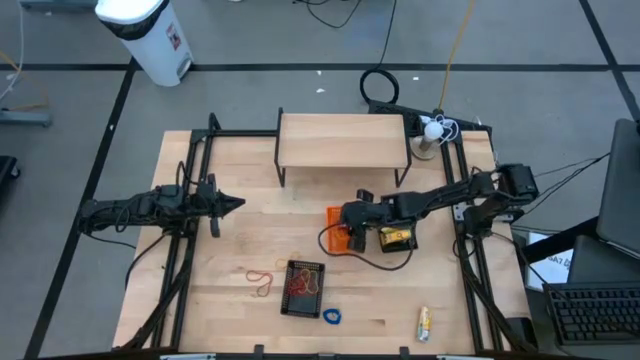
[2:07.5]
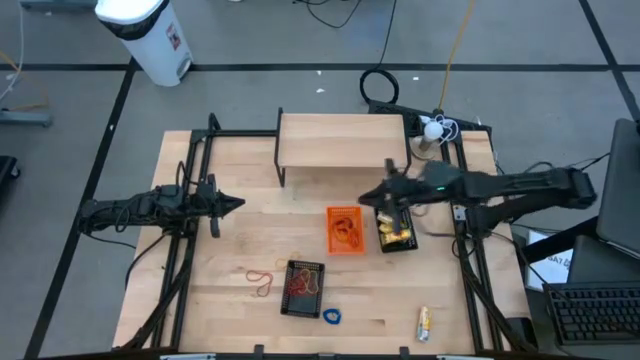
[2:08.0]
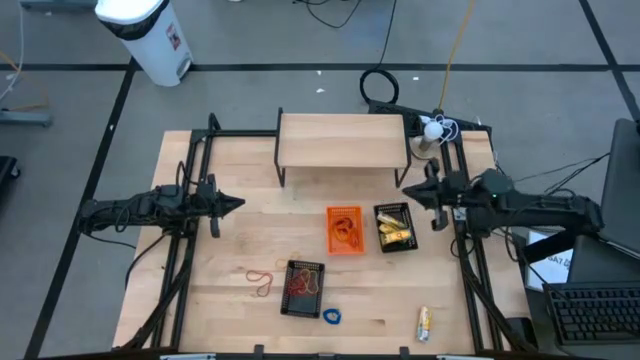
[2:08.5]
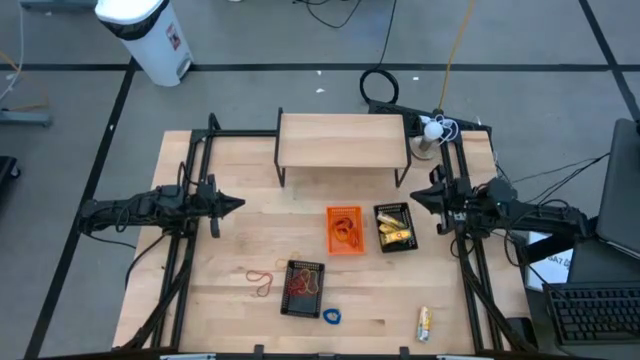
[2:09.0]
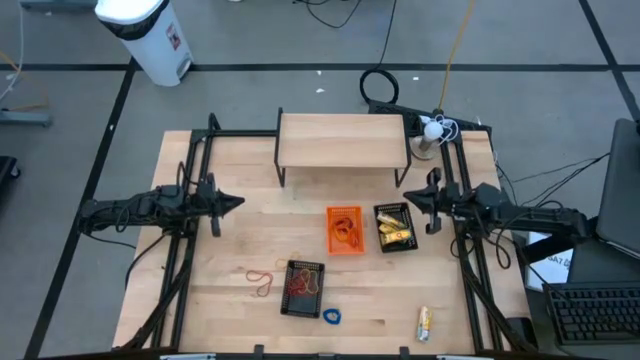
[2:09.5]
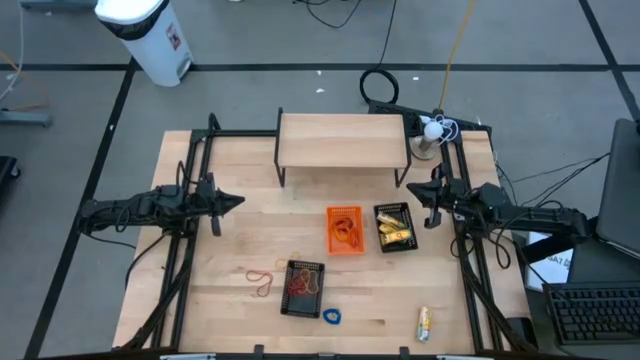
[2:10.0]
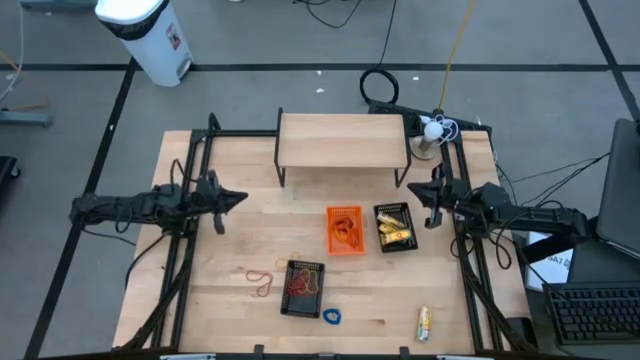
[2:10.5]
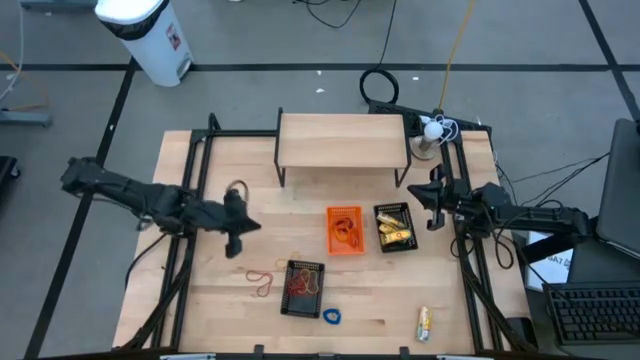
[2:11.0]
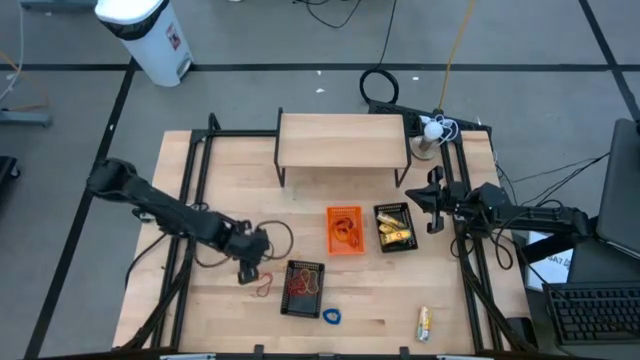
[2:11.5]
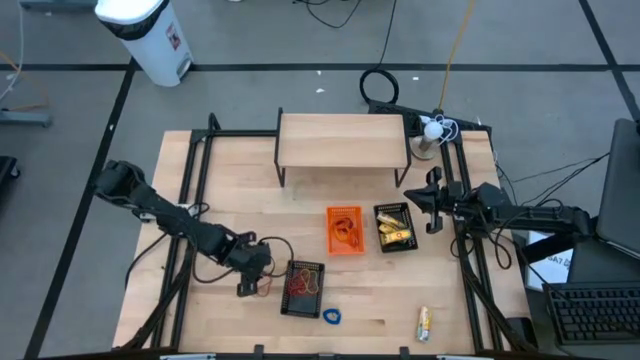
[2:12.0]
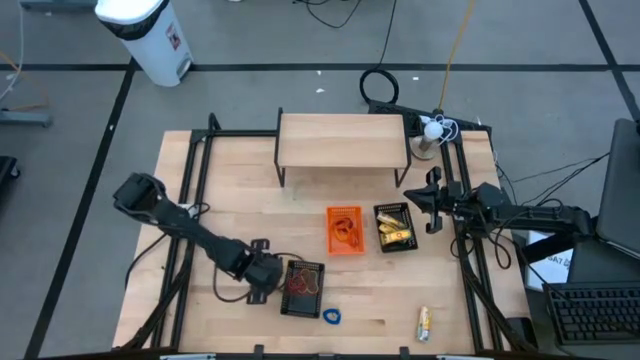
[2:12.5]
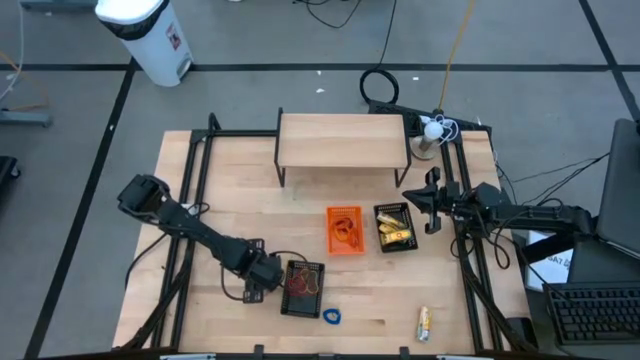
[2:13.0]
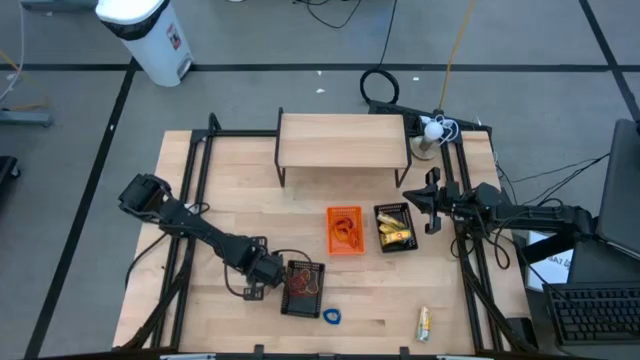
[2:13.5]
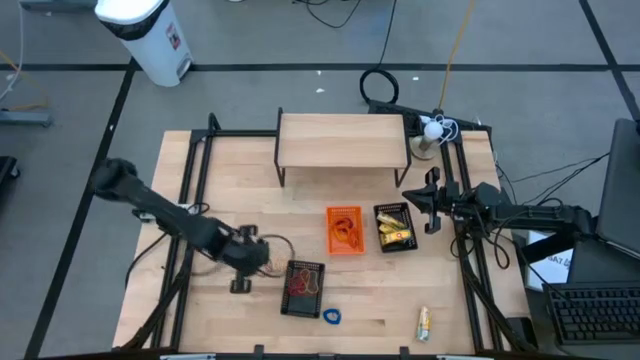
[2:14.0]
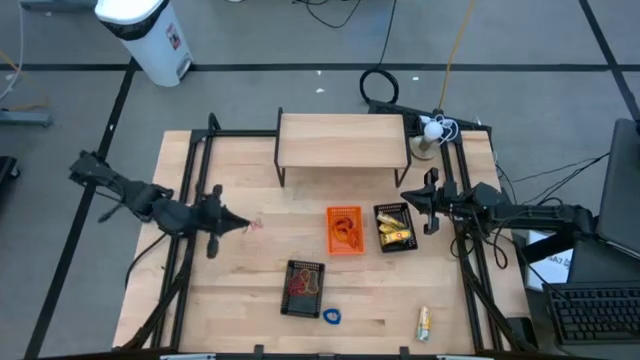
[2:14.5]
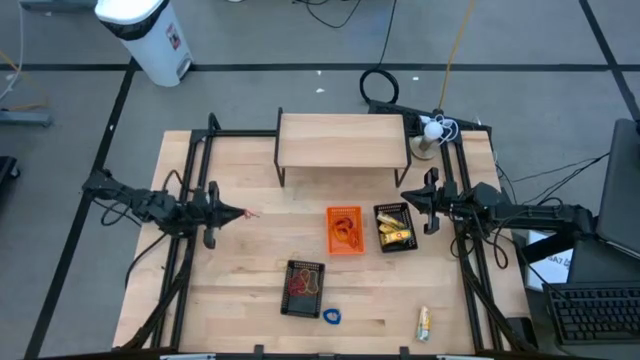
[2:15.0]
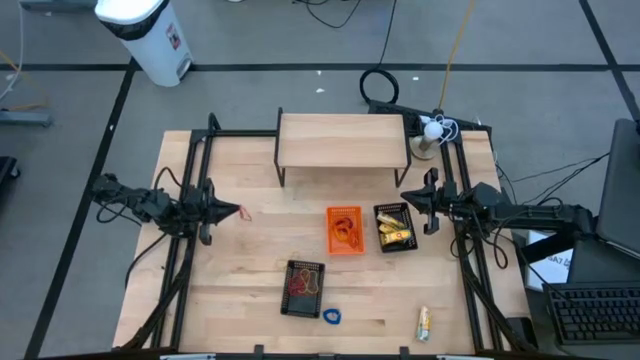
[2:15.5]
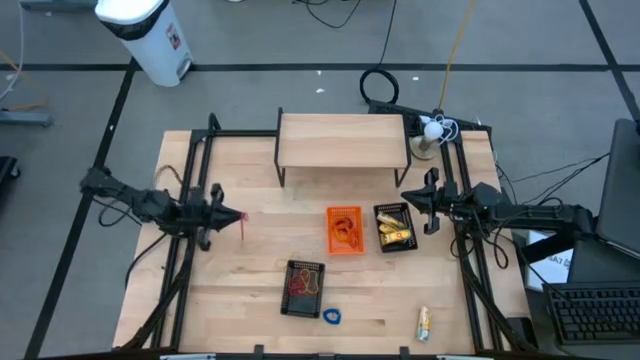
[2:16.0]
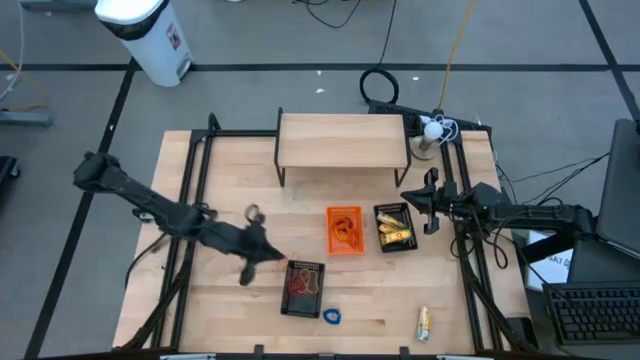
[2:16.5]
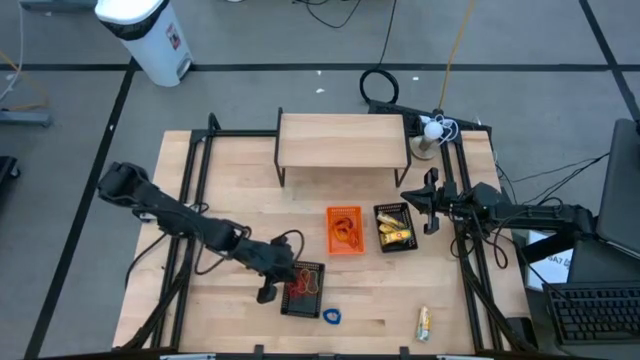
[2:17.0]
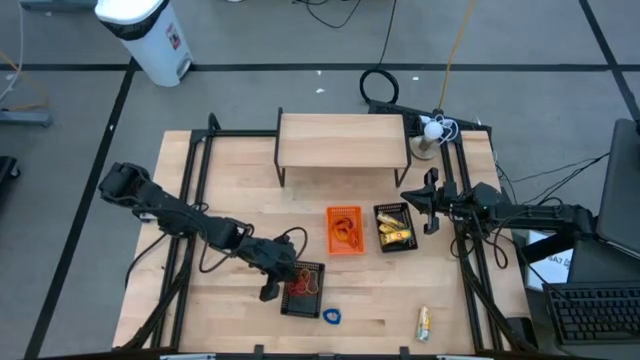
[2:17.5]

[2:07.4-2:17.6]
Task: Pick & Place Office Desk Supplies
Put the red rubber band into the bottom black bin

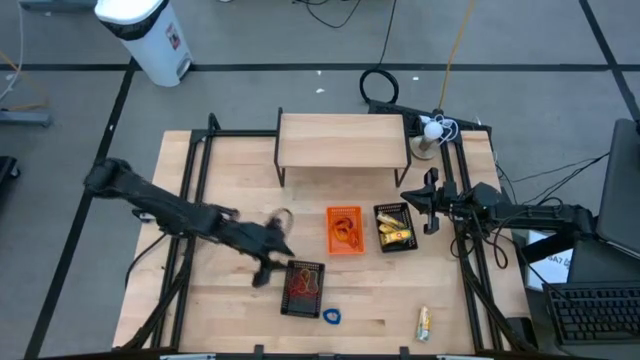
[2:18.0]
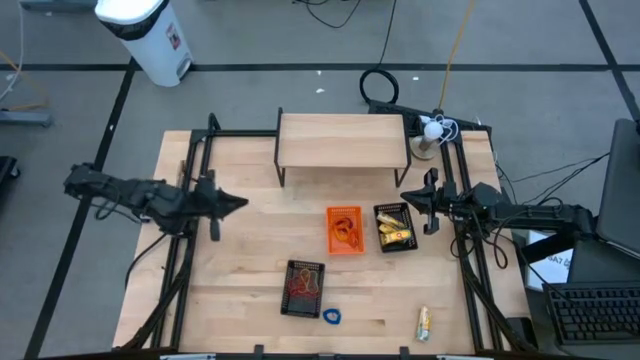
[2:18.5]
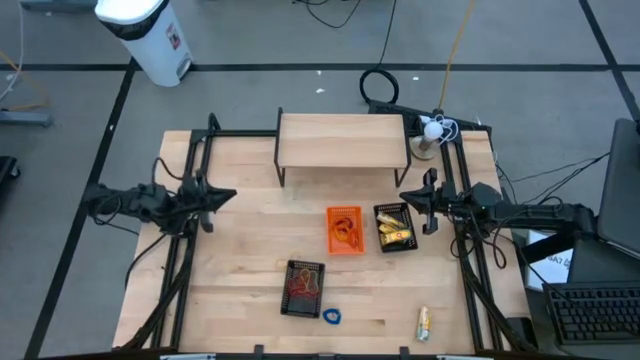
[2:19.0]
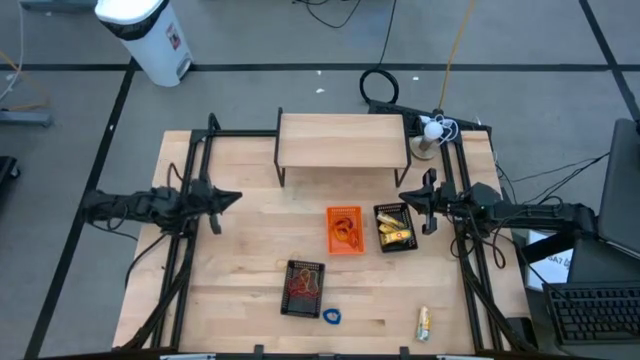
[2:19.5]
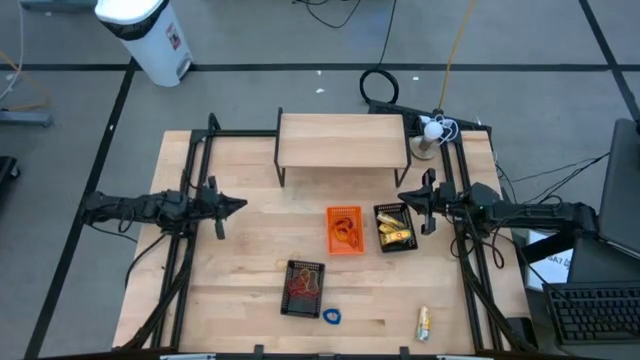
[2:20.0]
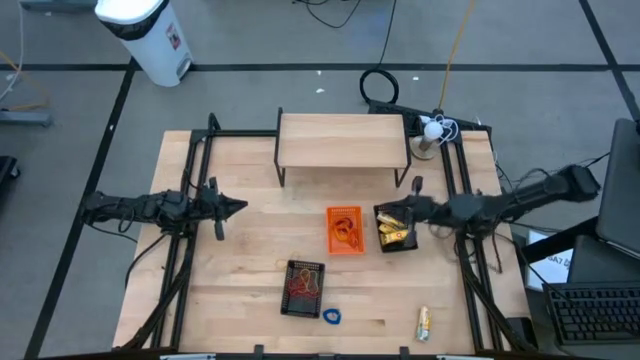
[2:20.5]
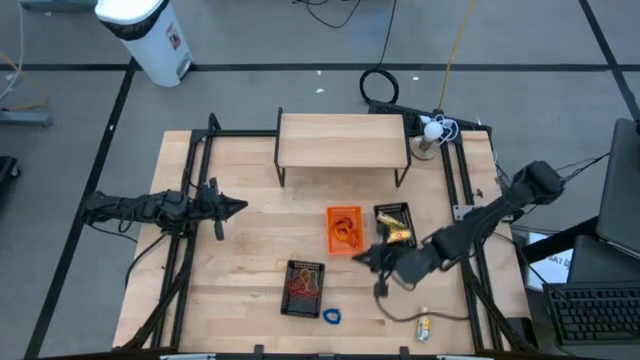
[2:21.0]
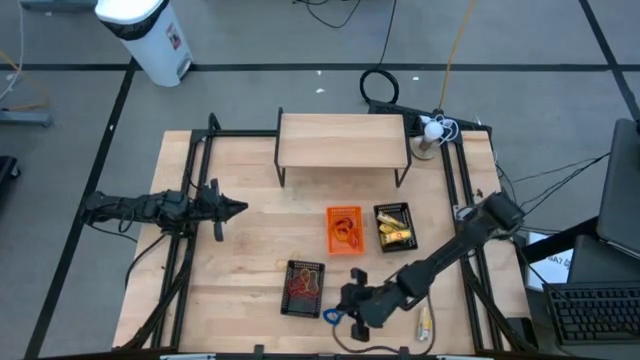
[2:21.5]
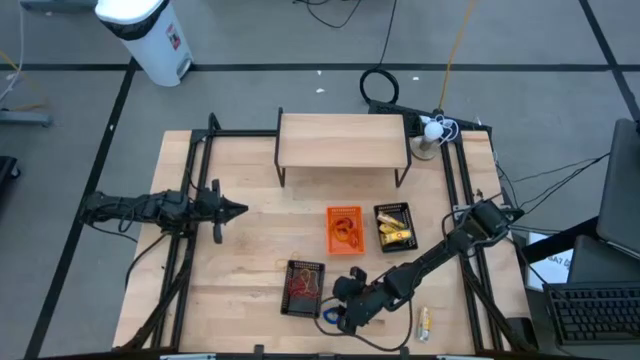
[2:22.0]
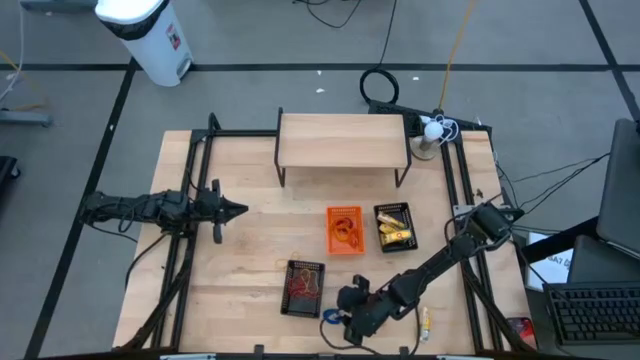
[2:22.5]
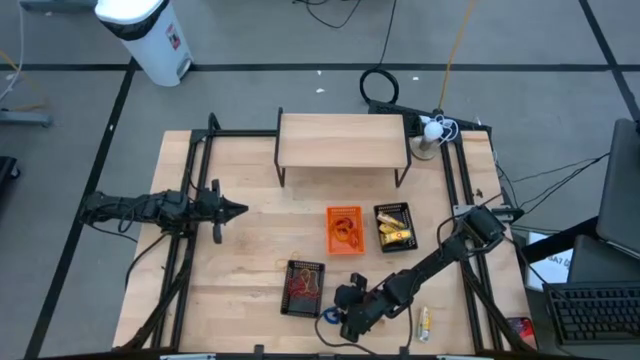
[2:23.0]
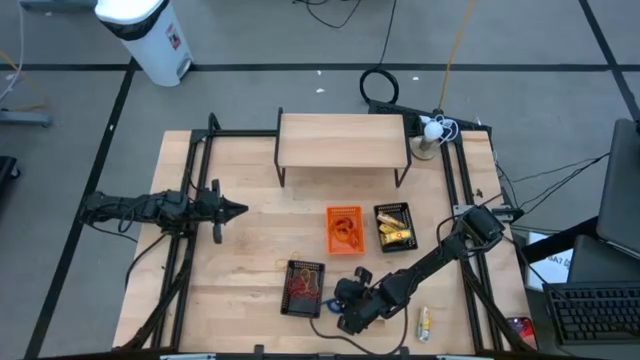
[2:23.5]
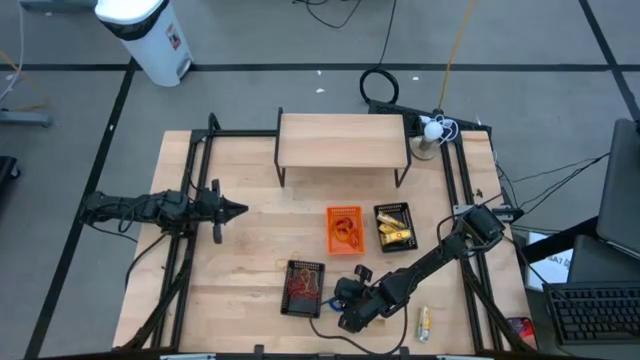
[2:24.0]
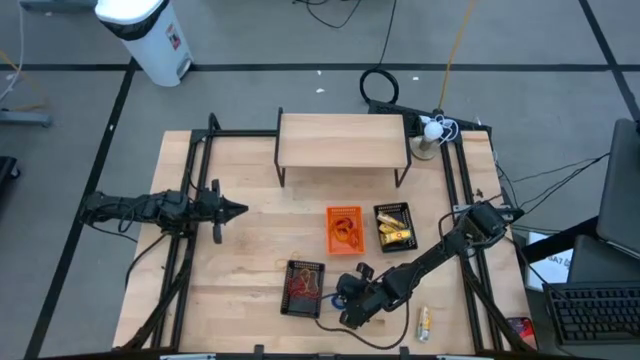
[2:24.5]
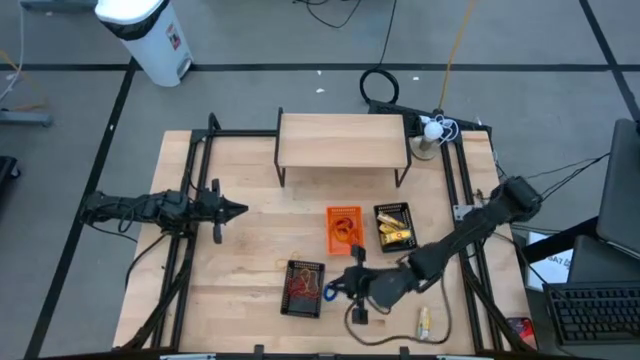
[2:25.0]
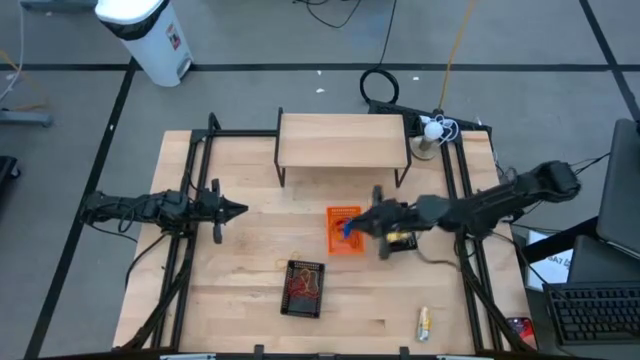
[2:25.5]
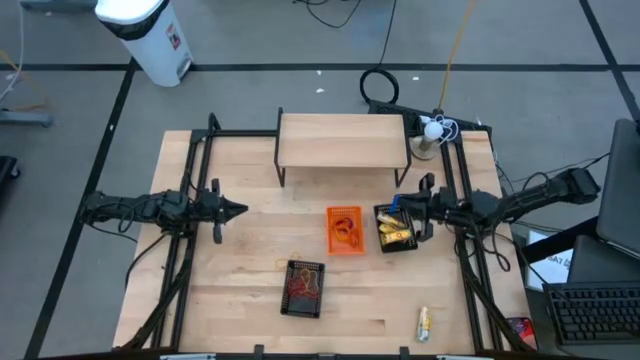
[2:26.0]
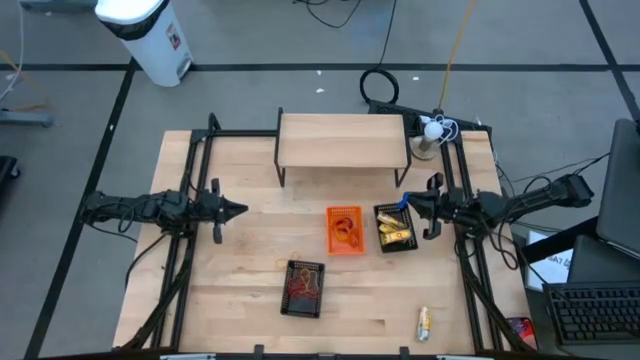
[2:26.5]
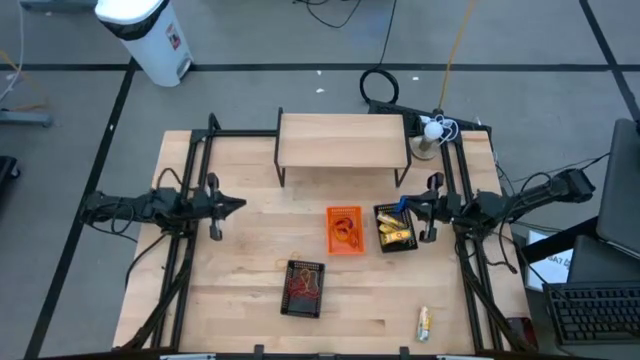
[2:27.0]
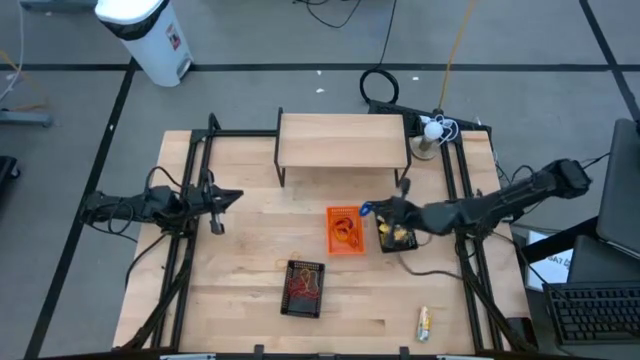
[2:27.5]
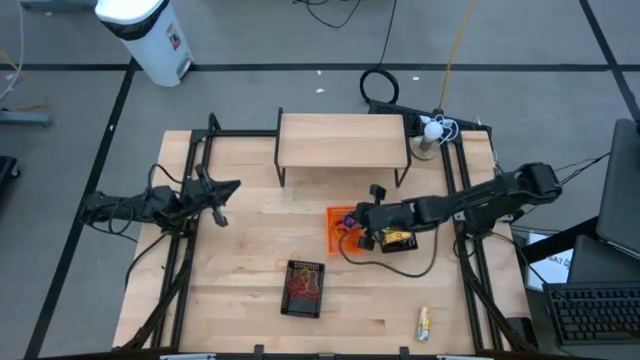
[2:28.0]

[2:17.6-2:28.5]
Put the blue spring keychain into the orange bin
